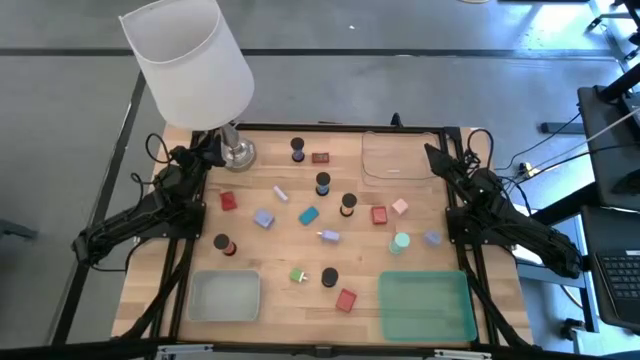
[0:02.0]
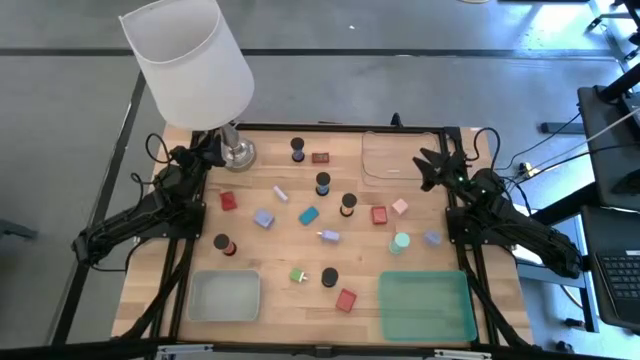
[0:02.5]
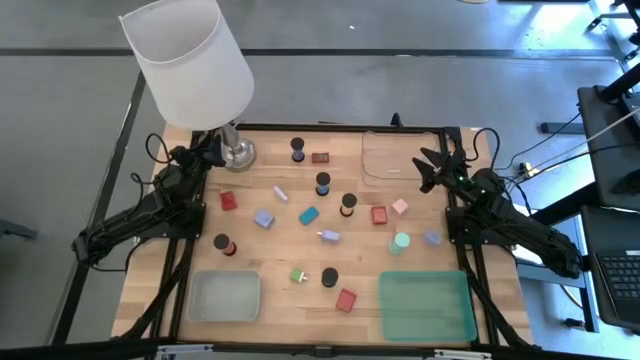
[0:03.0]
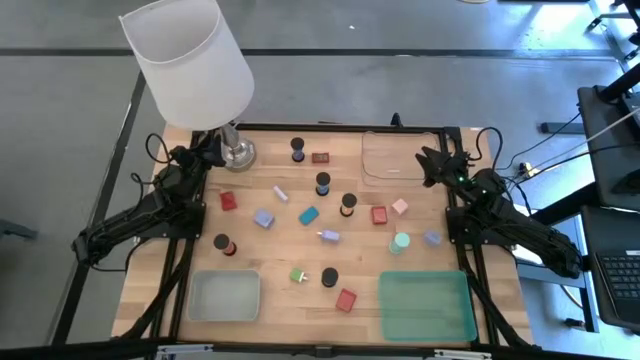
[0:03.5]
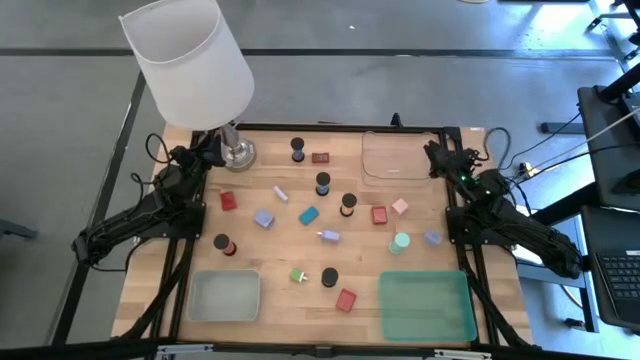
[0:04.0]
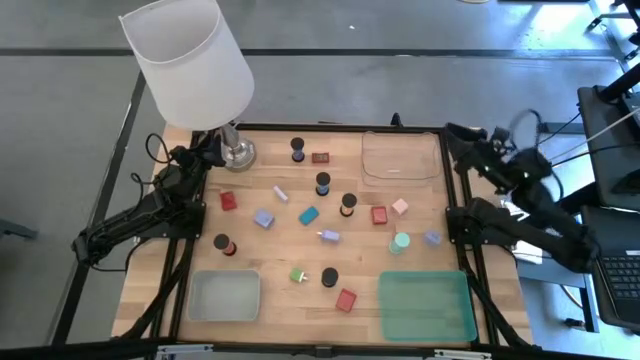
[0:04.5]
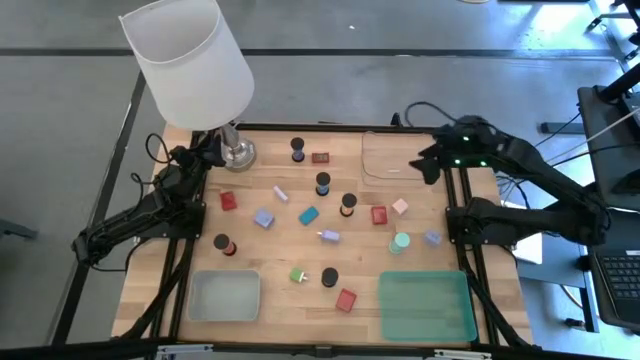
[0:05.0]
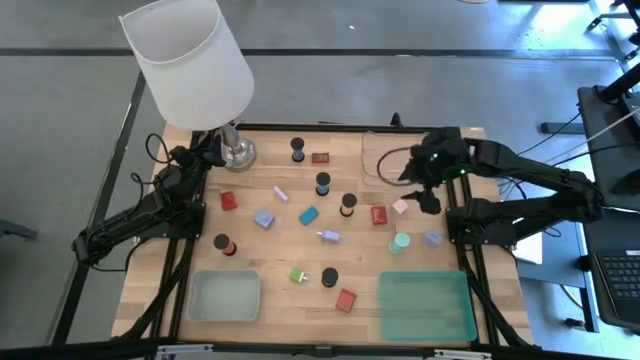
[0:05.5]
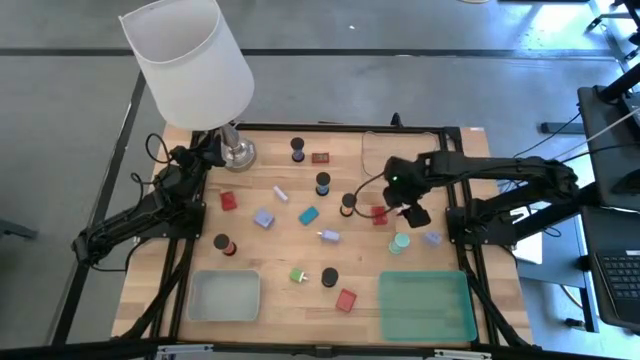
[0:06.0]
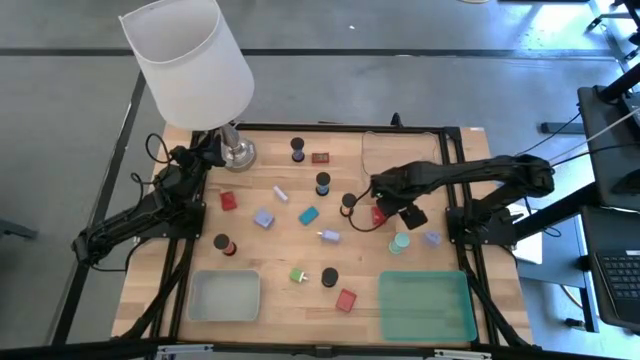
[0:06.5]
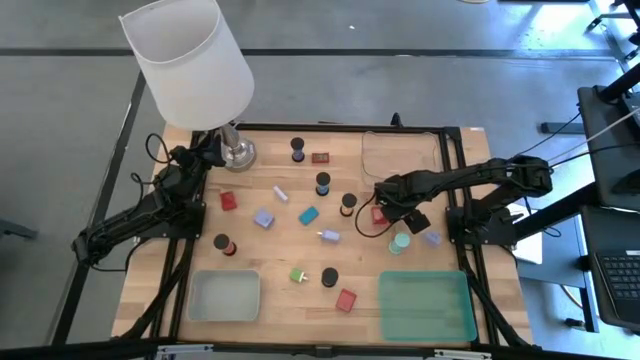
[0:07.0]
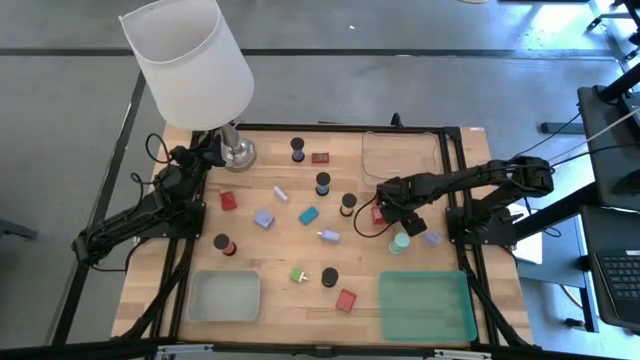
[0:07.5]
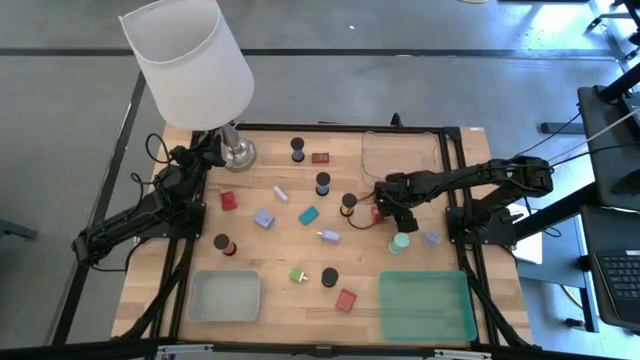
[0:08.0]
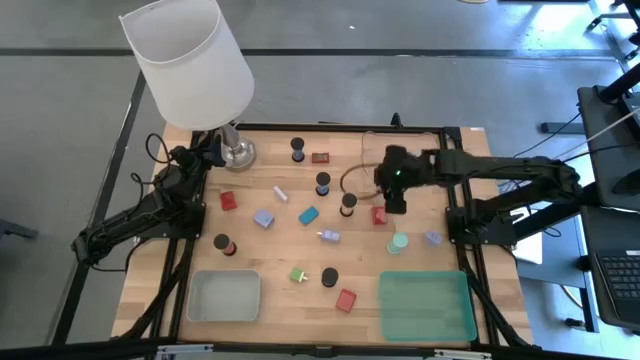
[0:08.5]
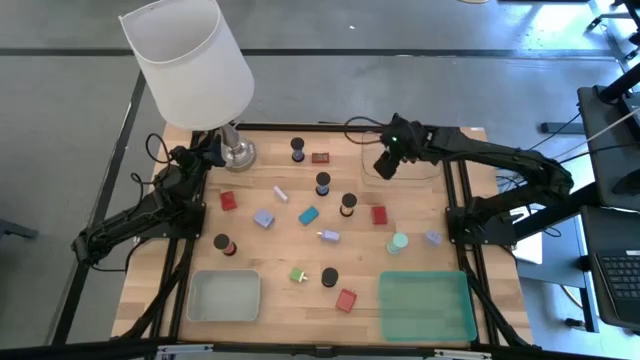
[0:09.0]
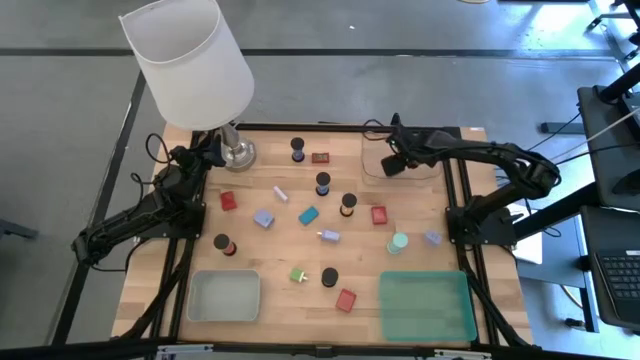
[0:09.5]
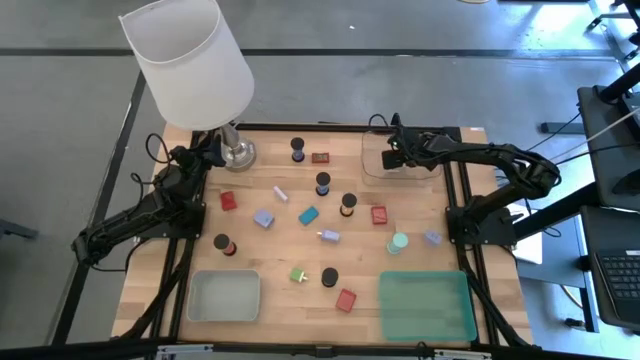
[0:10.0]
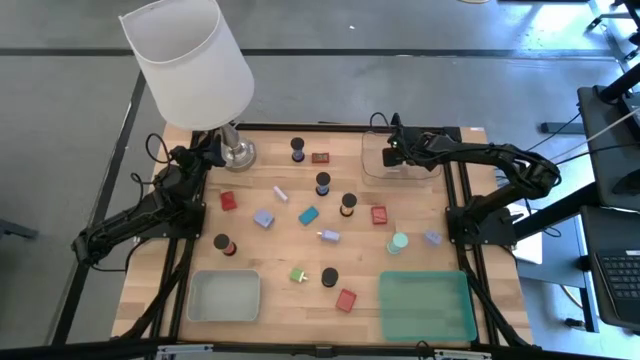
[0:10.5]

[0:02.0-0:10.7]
Task: Pick & Place Office items
Put the pink charger adapter into the transparent bin

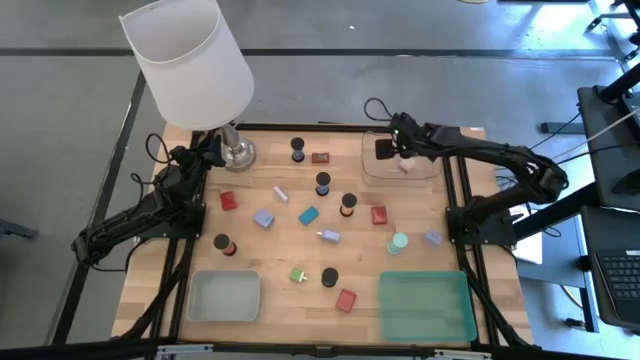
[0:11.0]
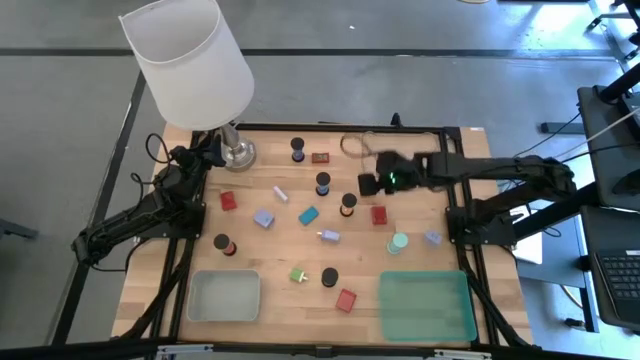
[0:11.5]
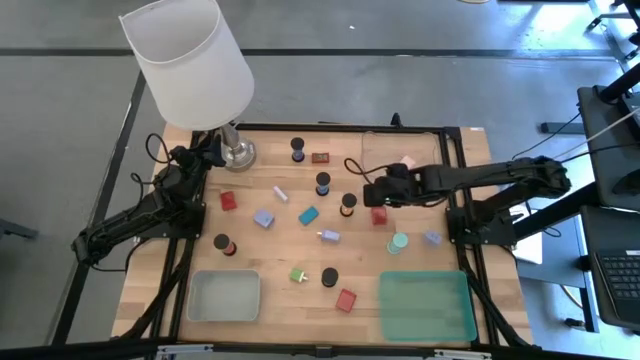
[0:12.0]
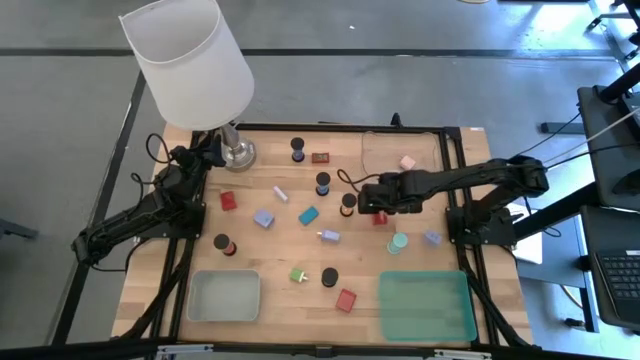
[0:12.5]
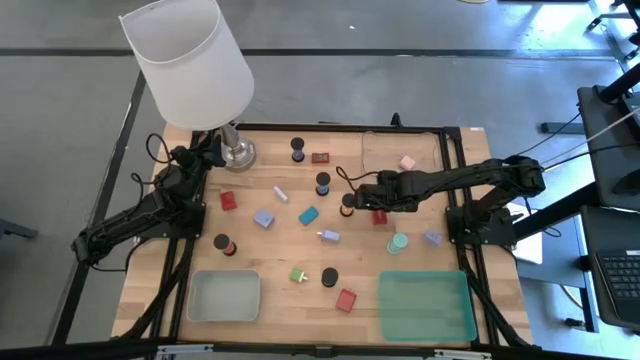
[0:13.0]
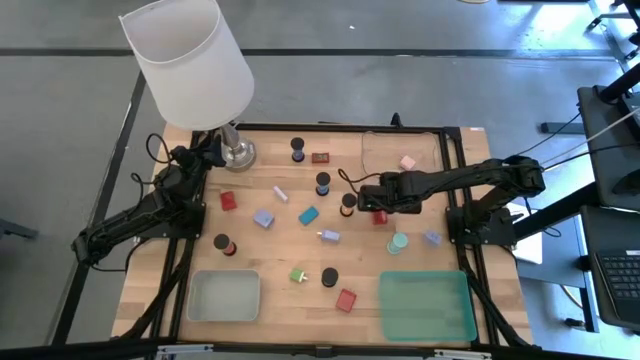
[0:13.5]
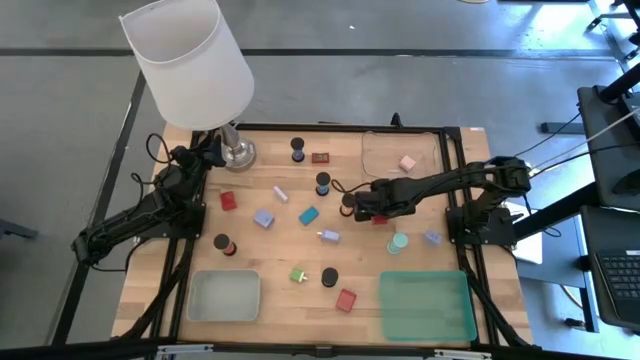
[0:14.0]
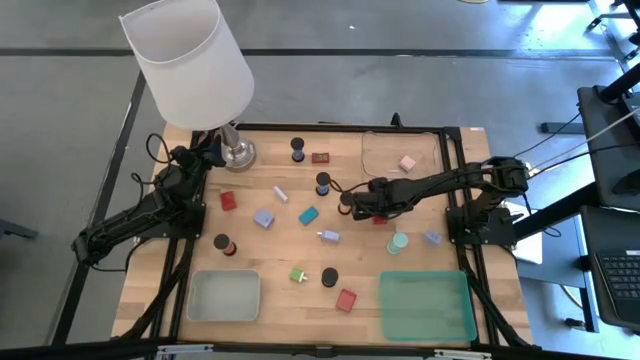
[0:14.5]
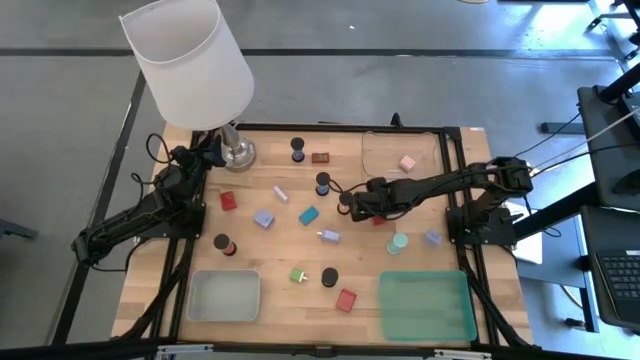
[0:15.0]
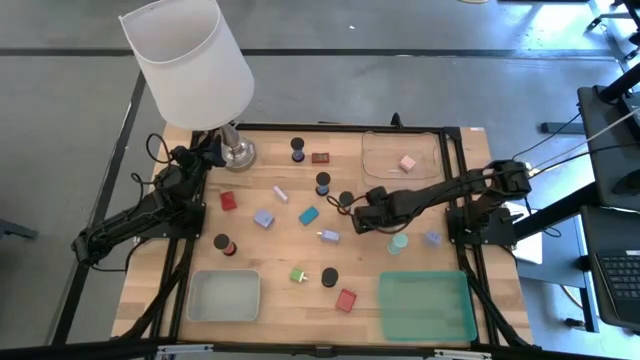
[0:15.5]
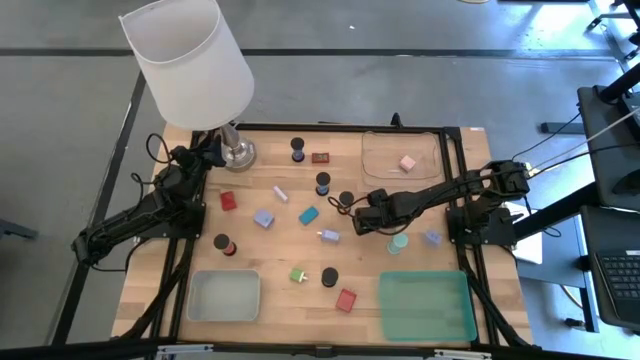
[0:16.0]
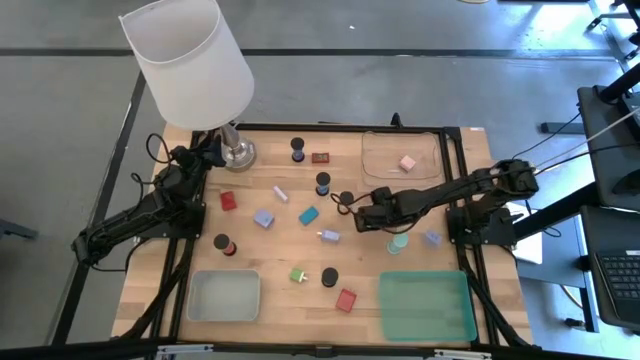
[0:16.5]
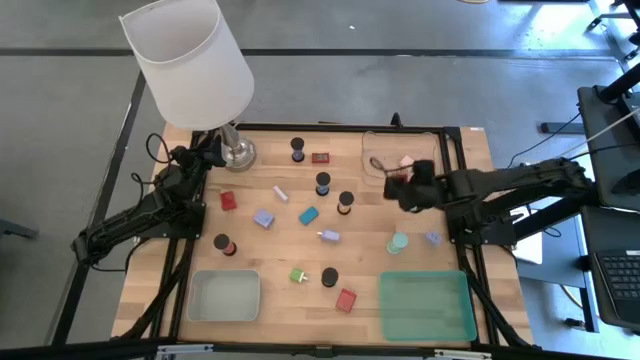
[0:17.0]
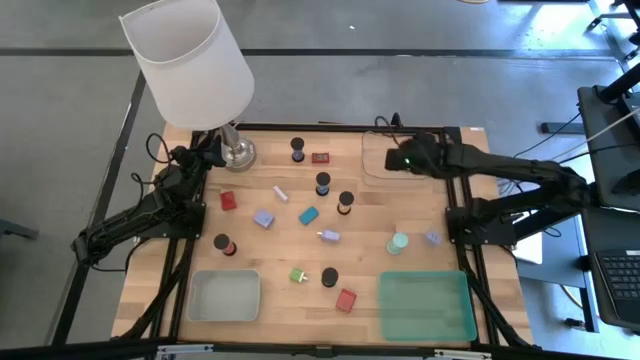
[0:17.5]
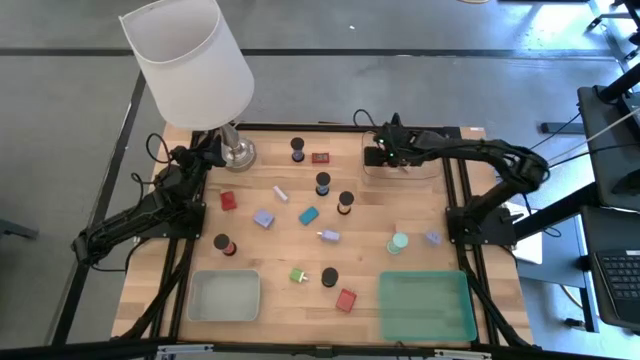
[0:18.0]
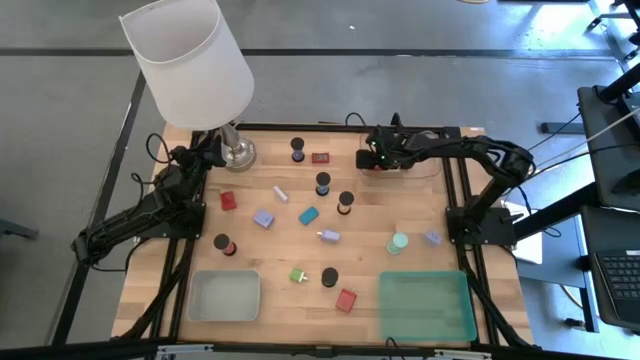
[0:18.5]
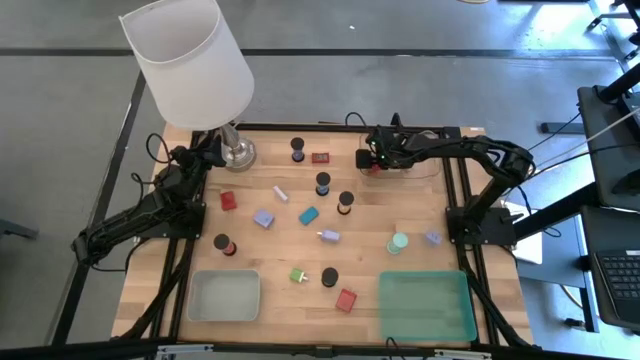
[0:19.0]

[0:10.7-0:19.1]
Put the top right red charger adapter into the transparent bin

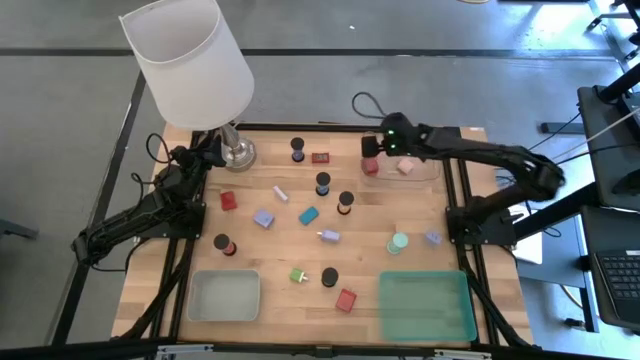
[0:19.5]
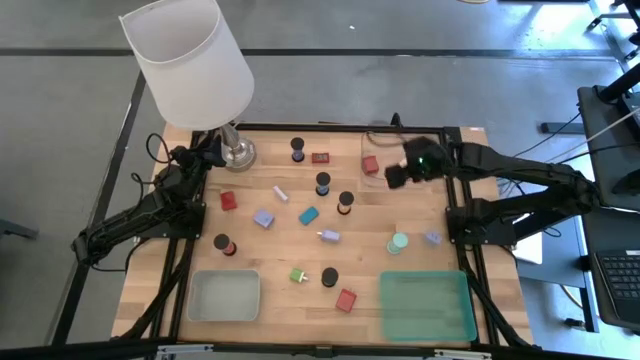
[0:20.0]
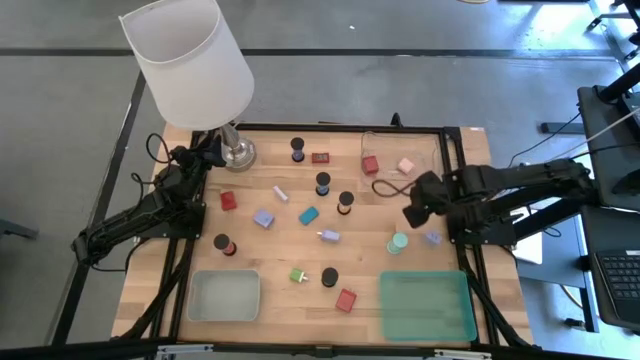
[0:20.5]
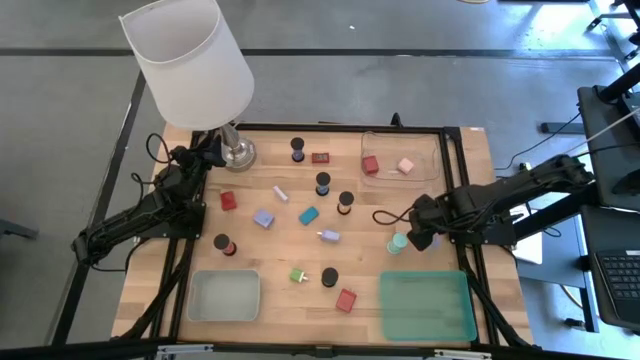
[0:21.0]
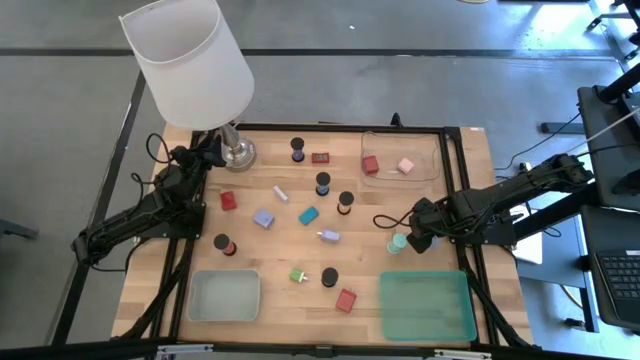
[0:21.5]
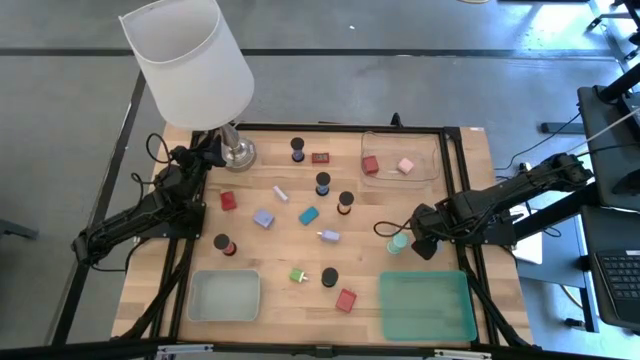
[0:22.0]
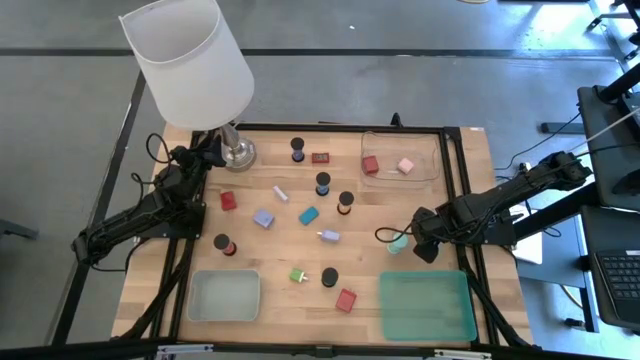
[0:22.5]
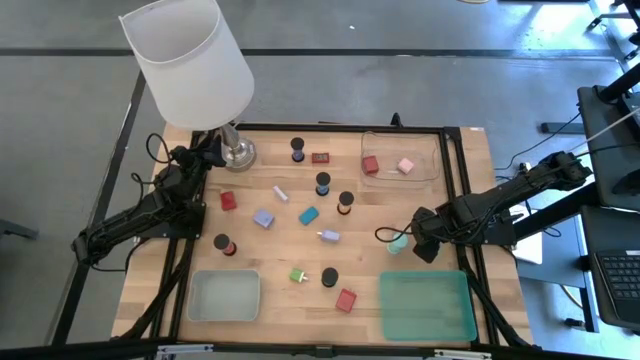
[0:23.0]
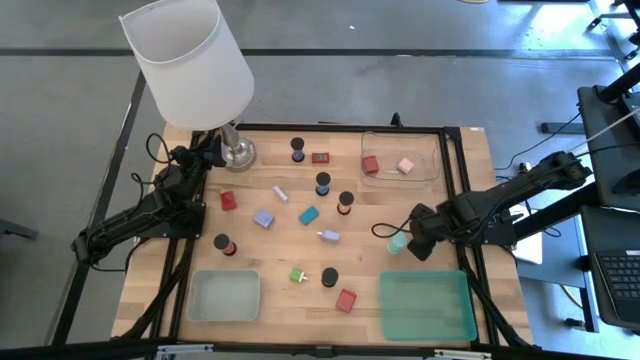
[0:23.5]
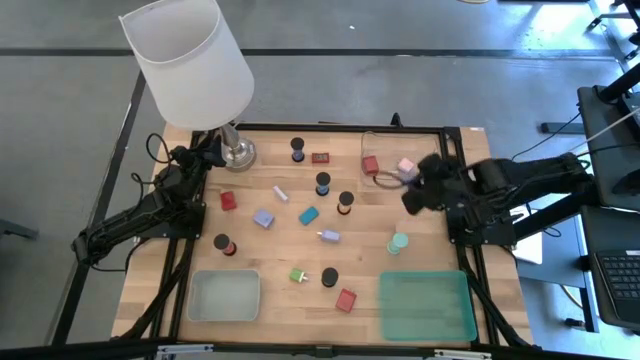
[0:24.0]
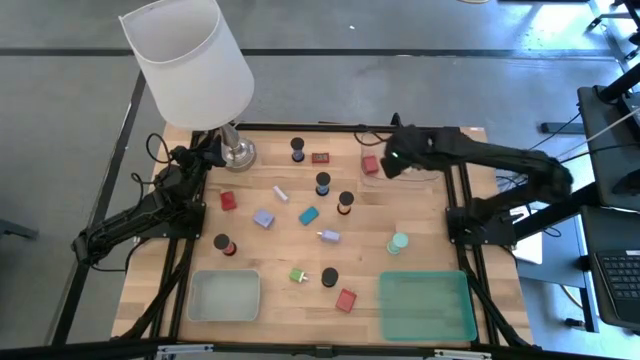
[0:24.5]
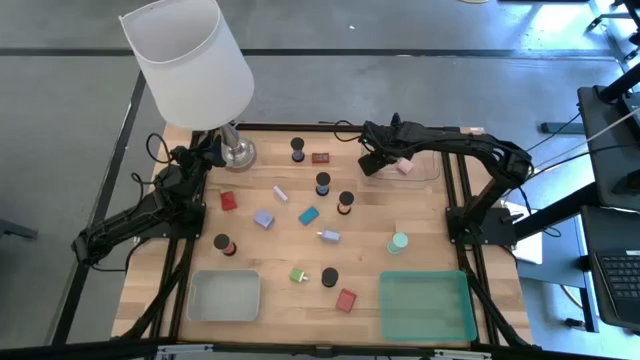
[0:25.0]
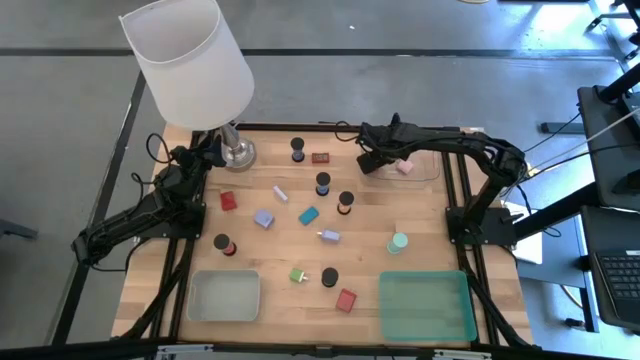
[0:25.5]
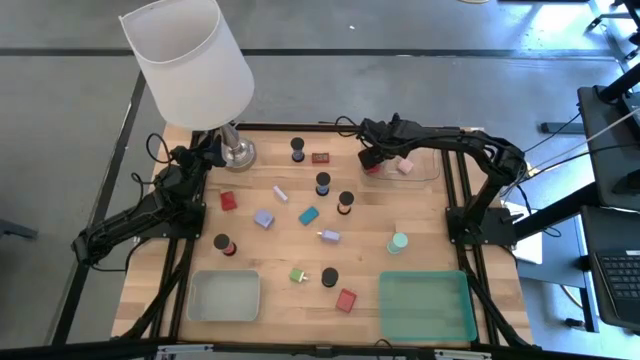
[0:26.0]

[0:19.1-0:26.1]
Put the right blue charger adapter into the transparent bin
